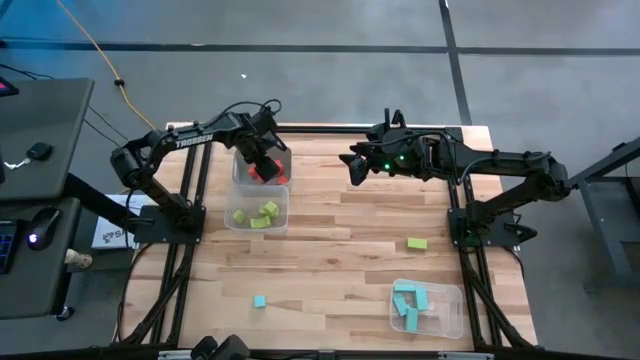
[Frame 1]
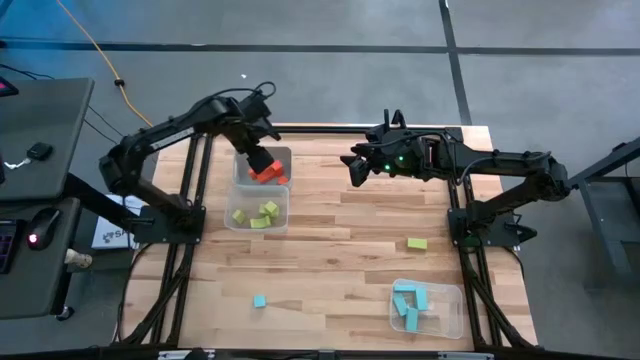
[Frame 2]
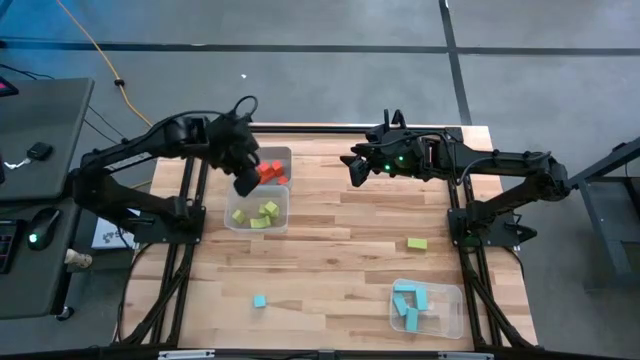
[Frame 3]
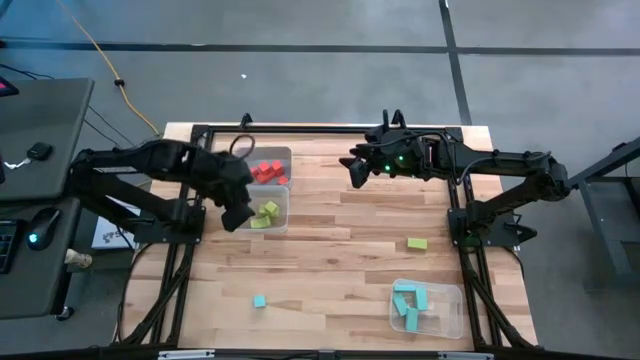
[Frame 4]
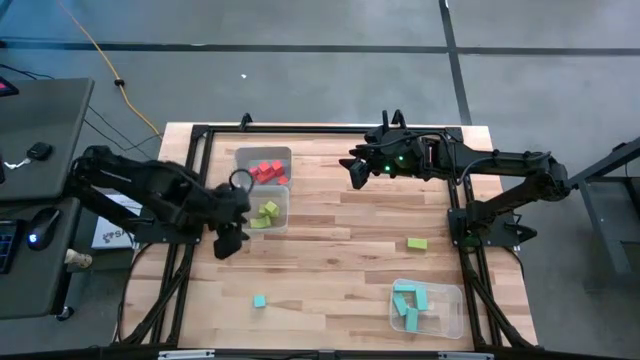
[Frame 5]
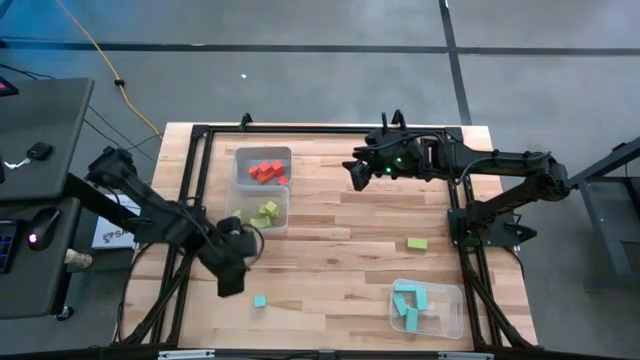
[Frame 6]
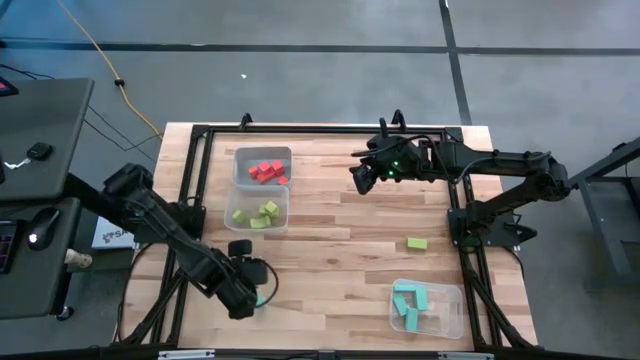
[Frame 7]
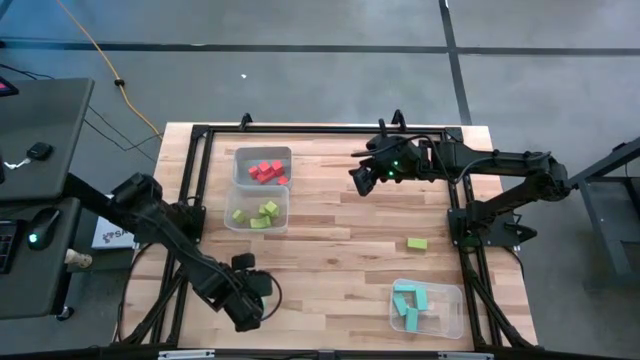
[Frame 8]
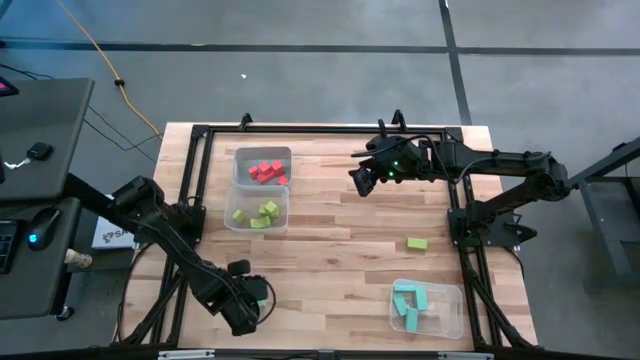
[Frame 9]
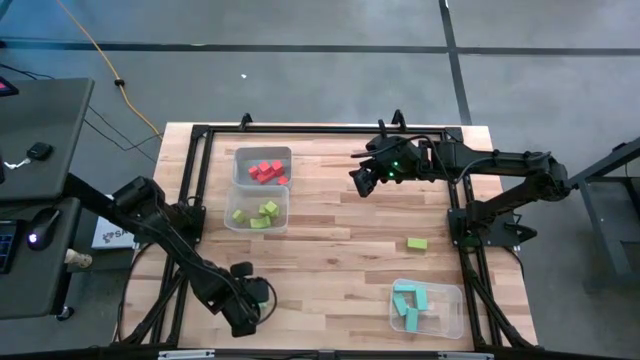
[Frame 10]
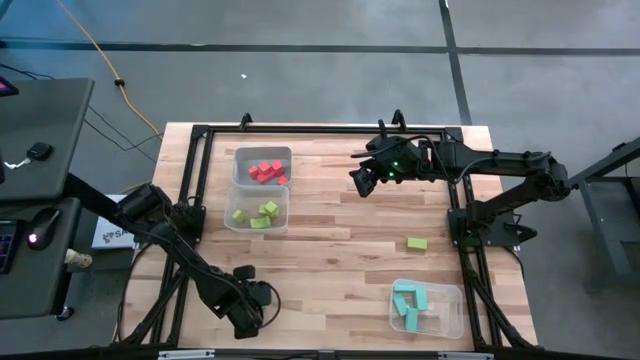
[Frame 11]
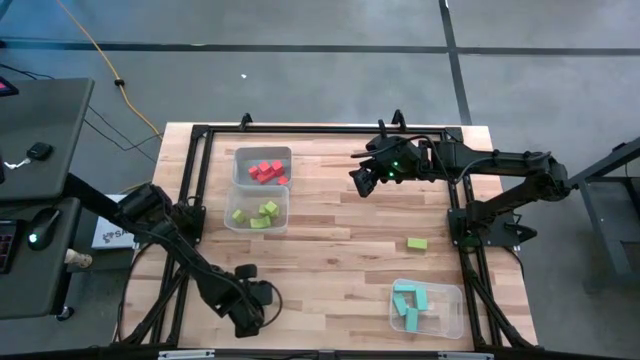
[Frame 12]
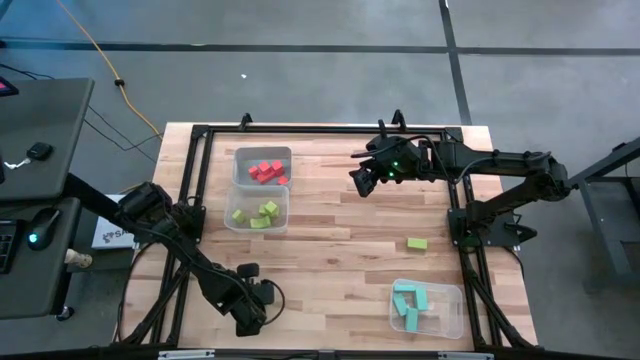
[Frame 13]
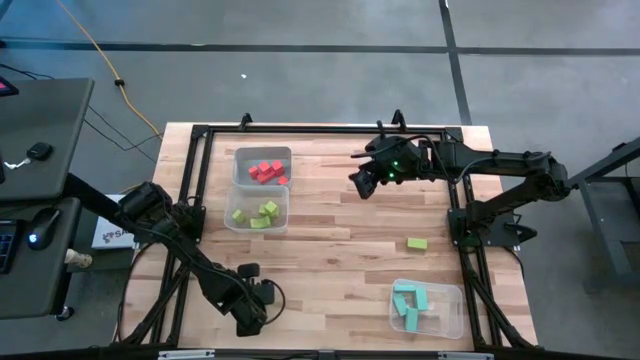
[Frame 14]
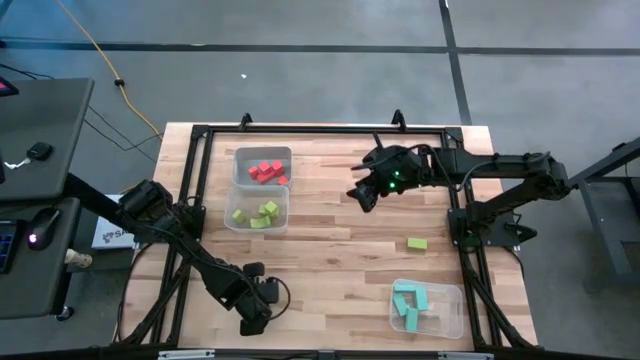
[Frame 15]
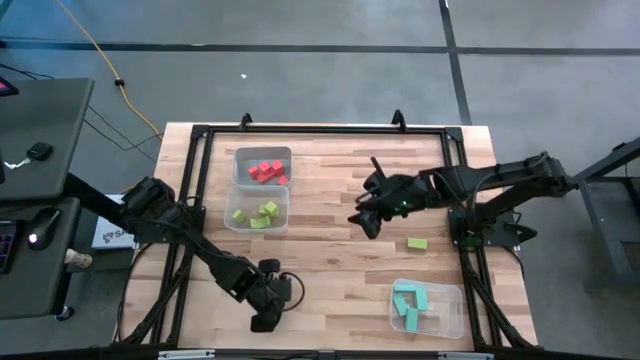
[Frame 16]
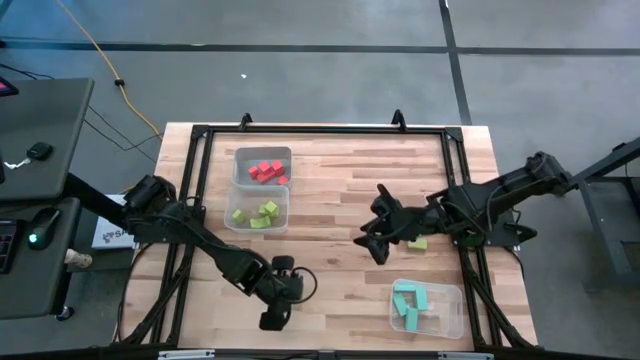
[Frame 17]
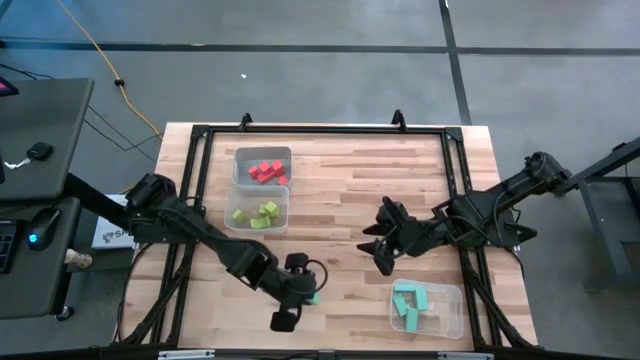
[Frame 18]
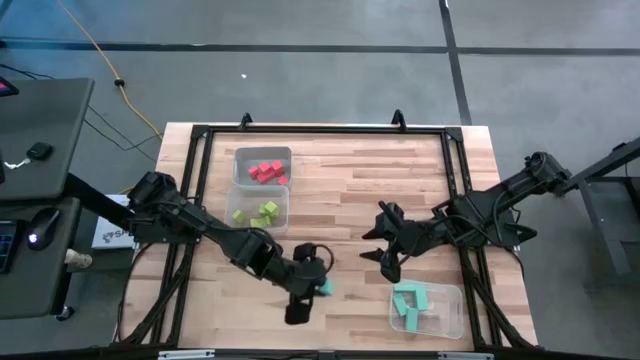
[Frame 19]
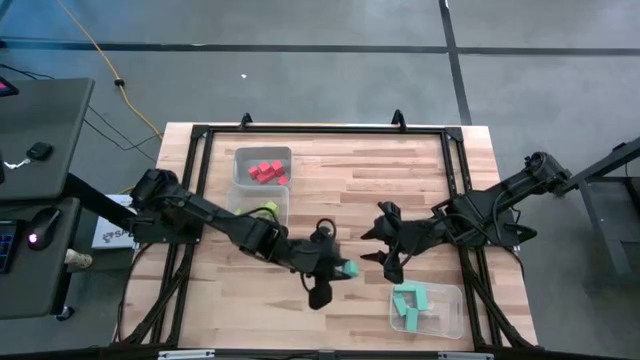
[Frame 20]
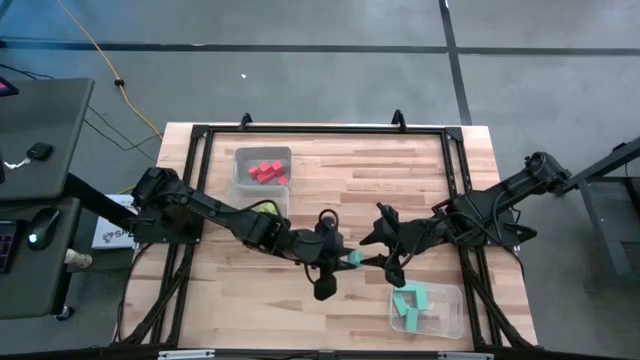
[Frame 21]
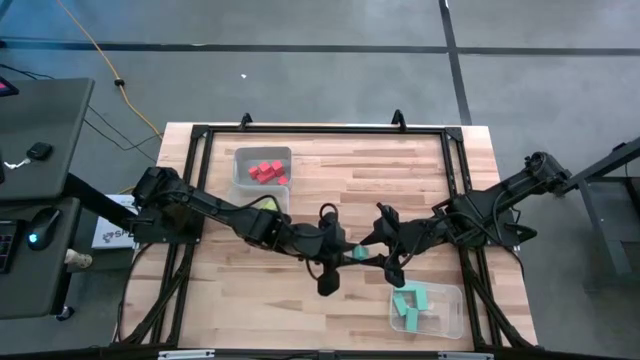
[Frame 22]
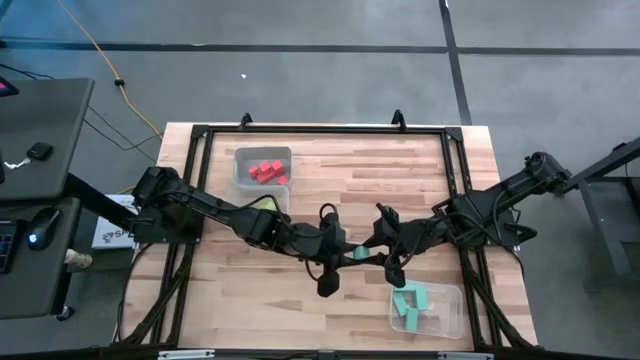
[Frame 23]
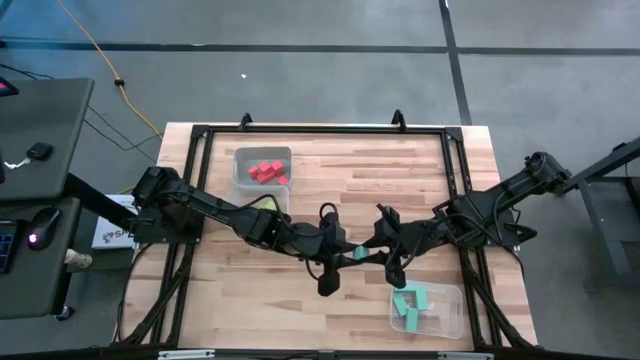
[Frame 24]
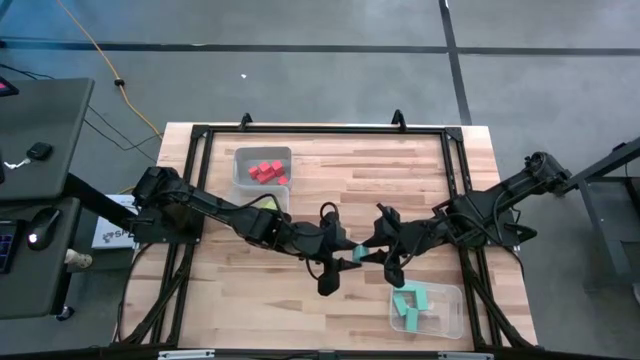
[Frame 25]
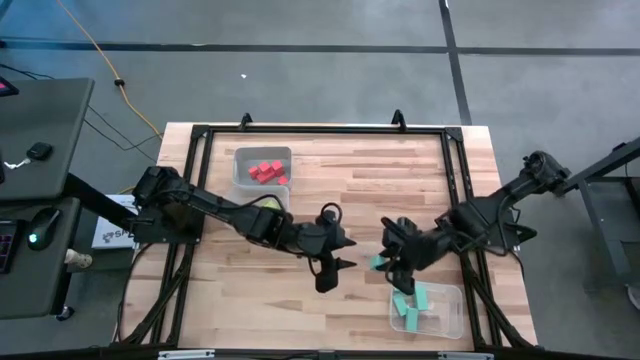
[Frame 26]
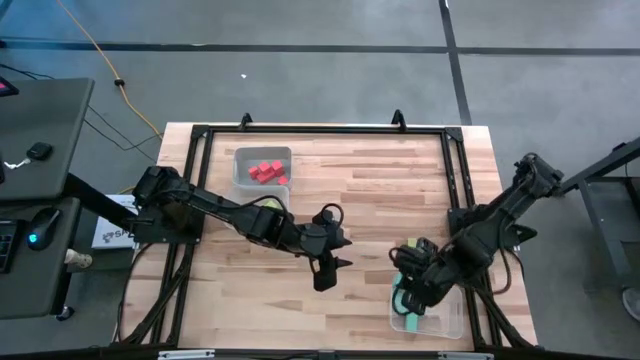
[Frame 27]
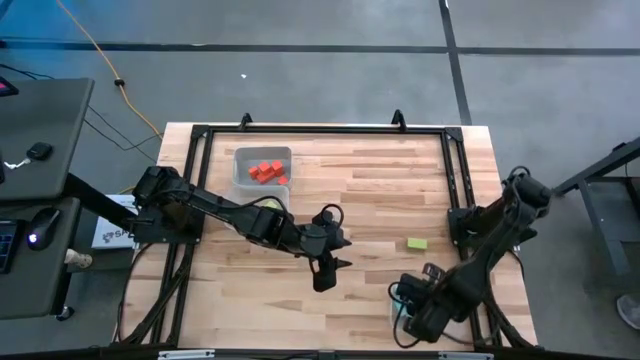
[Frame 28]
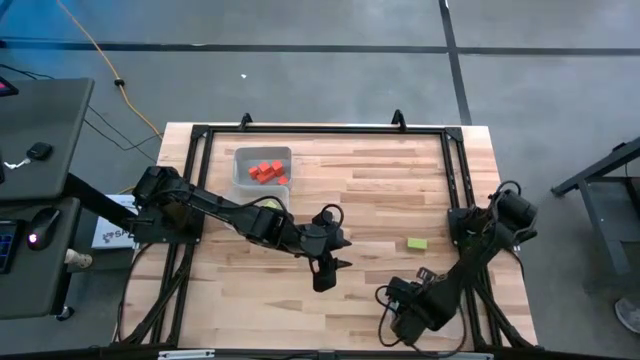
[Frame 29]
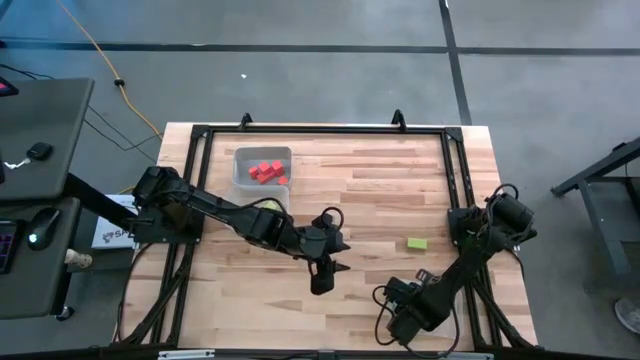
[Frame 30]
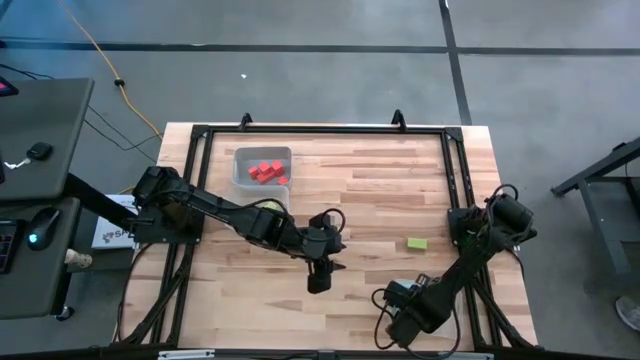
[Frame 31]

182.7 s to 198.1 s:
Task: Sort & place blocks by color
Put the blue block into the bottom transparent bin

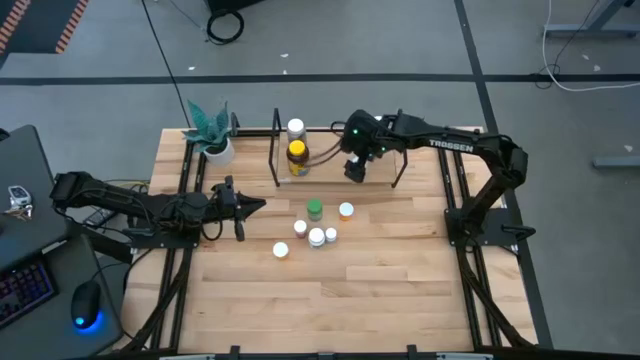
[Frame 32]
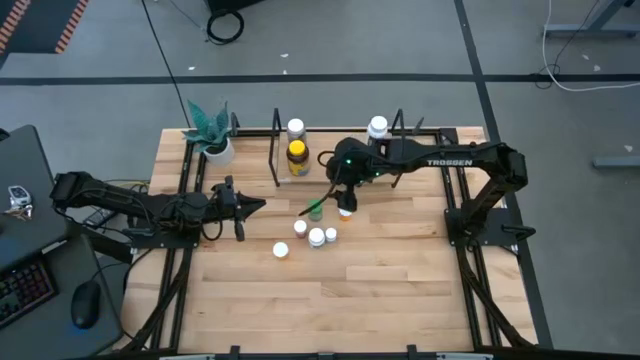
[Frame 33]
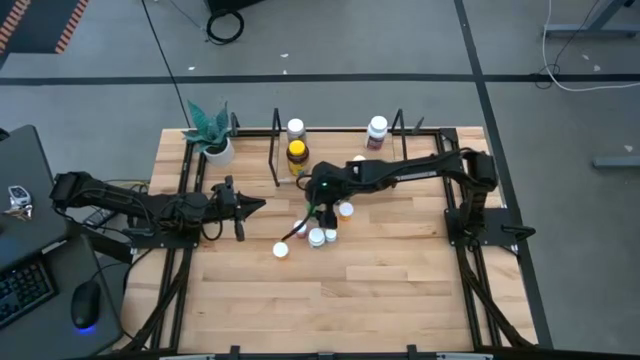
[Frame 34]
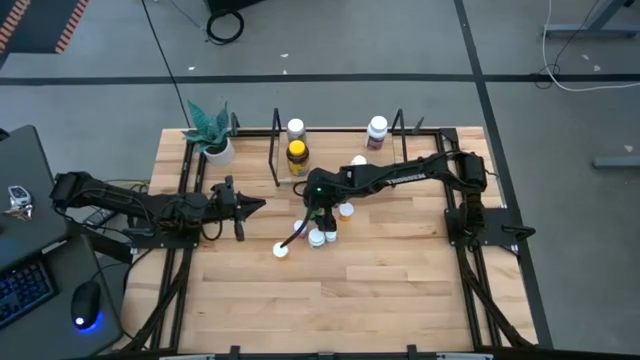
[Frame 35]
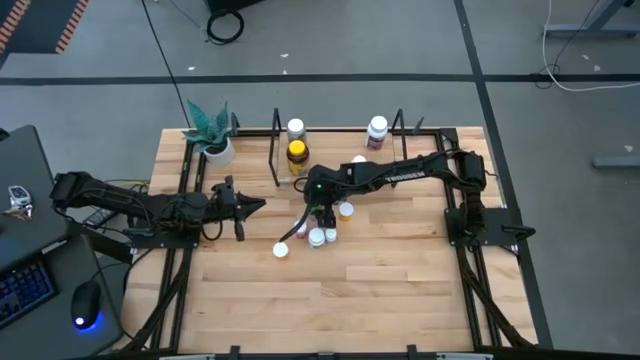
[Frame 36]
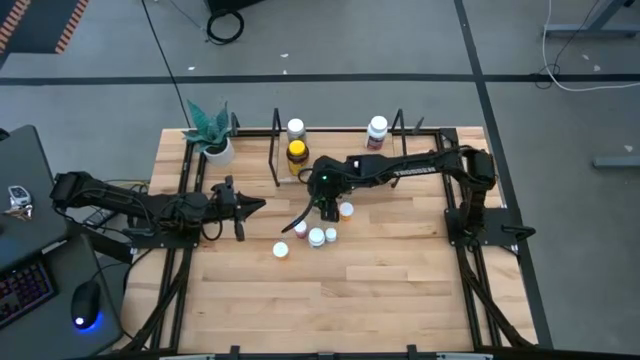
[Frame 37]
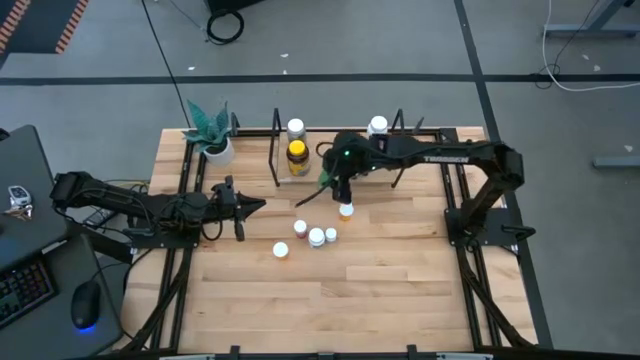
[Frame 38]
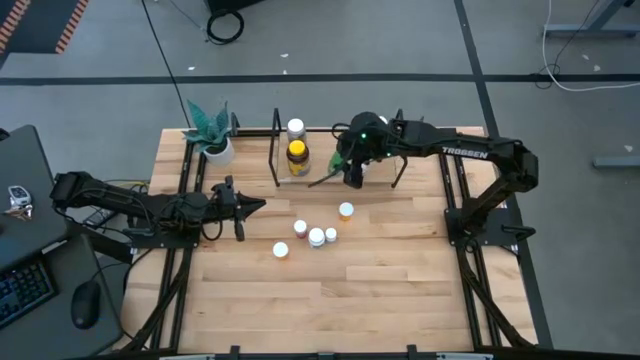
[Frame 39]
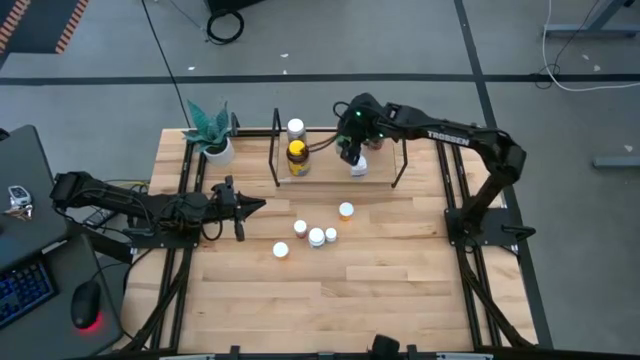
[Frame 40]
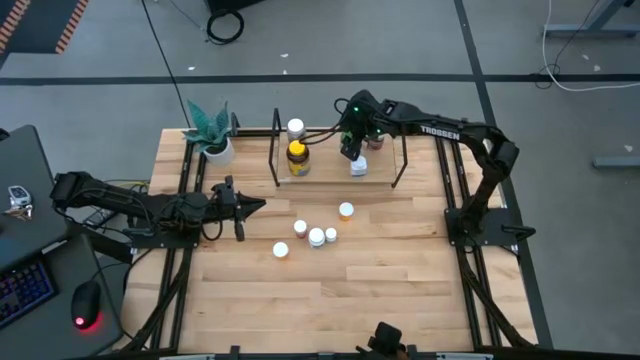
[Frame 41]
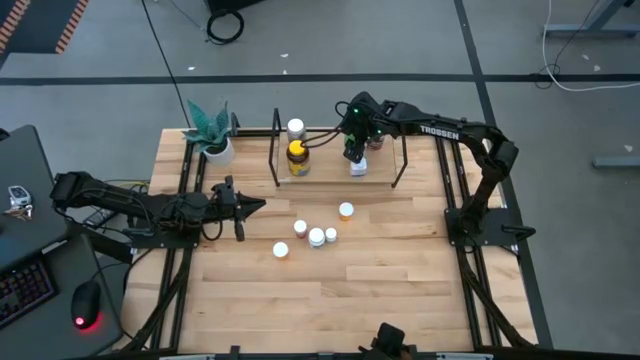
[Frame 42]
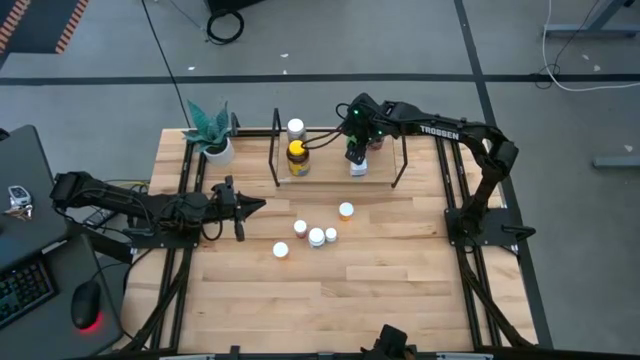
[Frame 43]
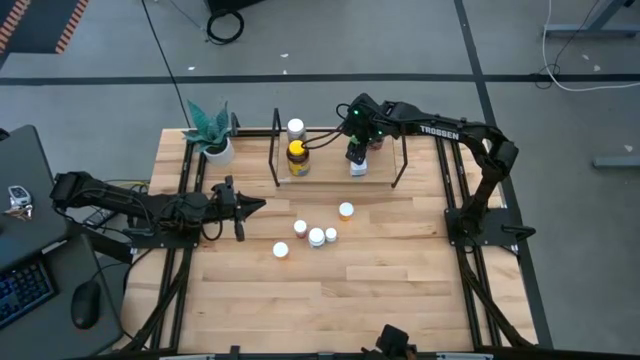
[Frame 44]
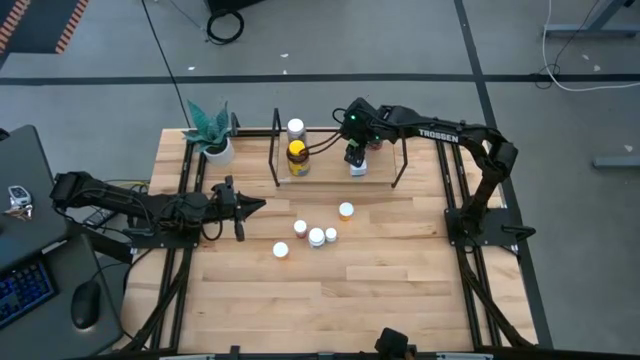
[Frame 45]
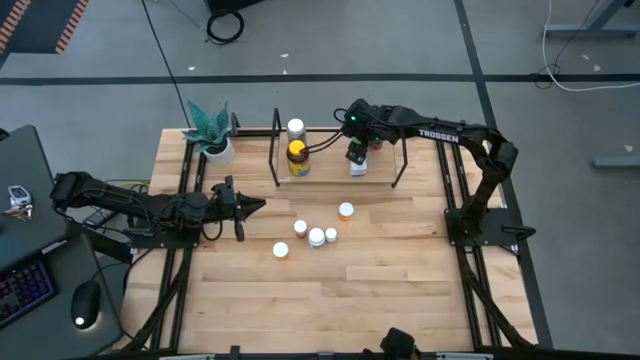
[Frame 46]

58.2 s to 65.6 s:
Task: Pick and place medicine bottles onto shelf by color
Put the green medicine bottle on the shelf
